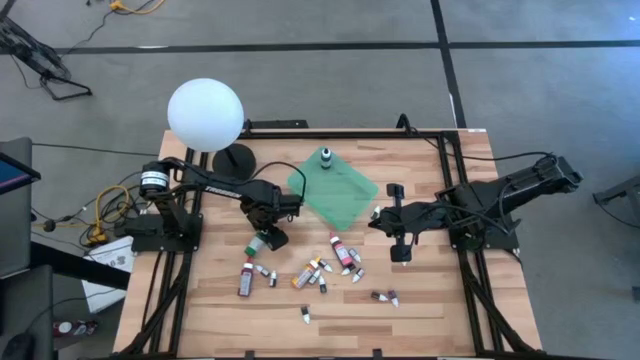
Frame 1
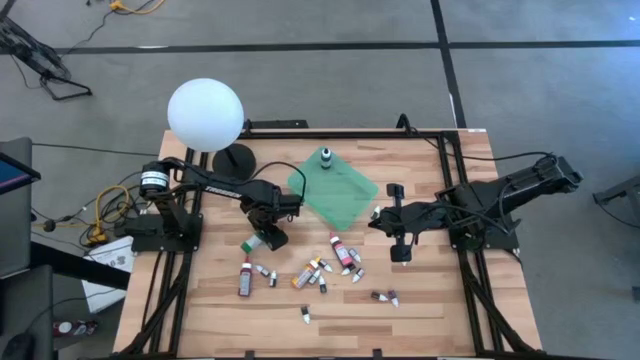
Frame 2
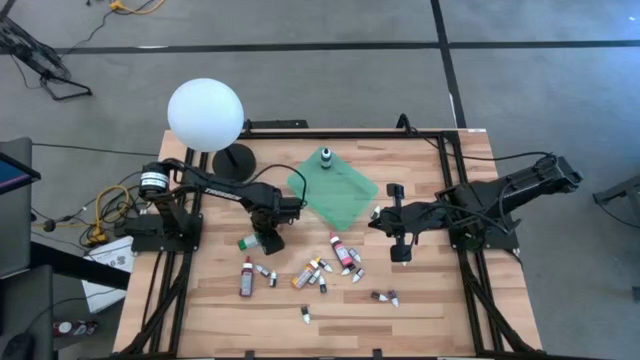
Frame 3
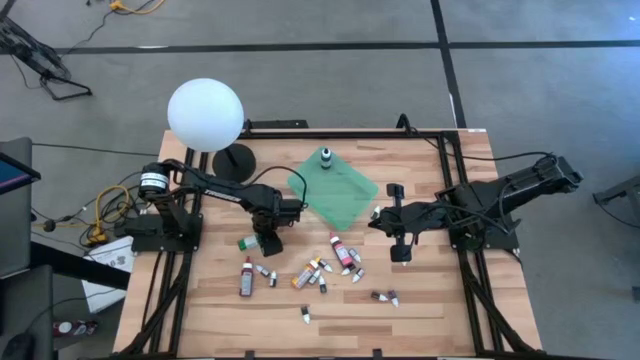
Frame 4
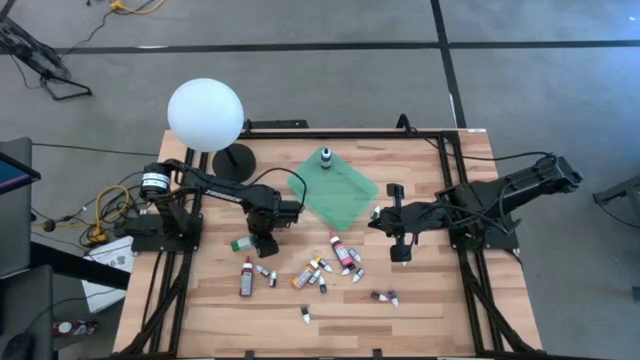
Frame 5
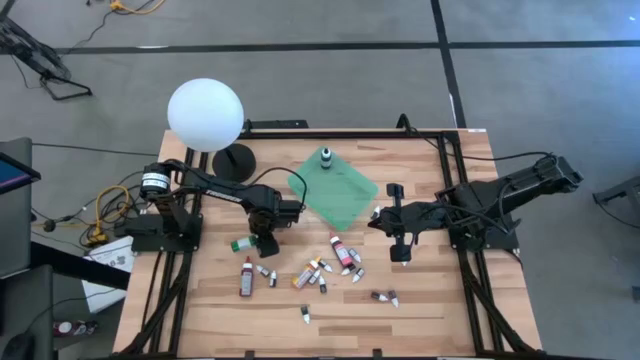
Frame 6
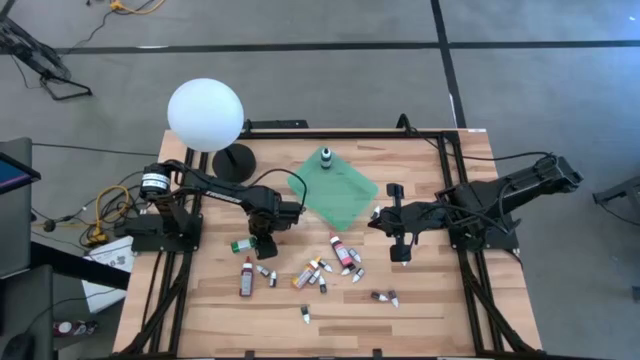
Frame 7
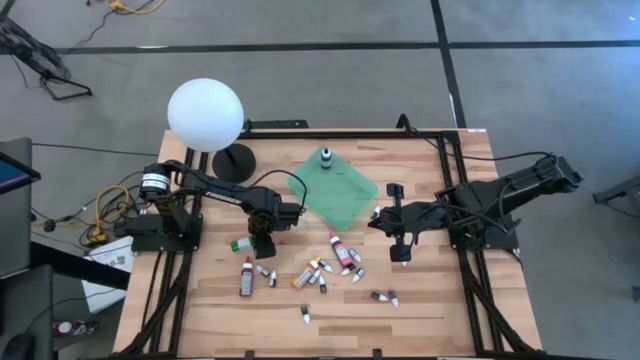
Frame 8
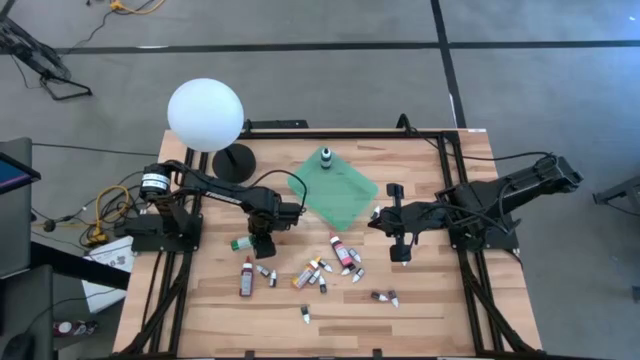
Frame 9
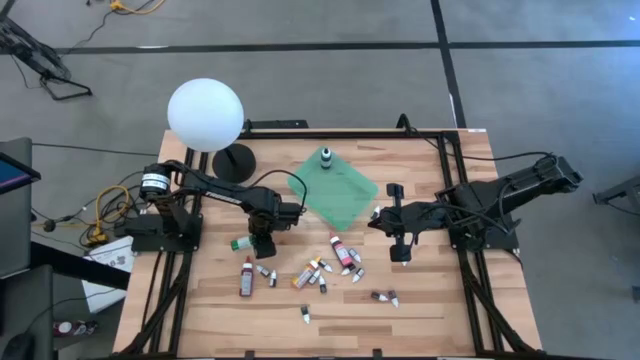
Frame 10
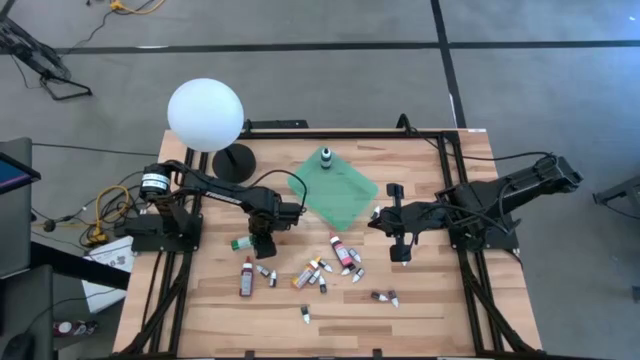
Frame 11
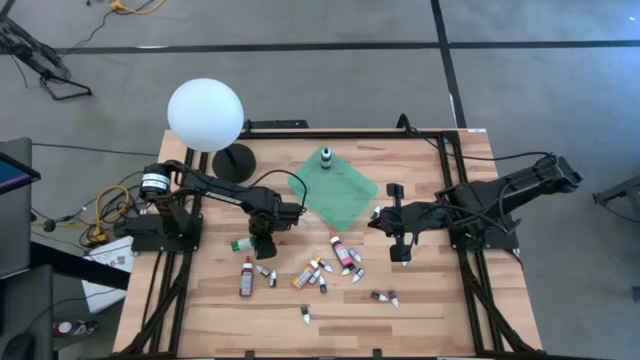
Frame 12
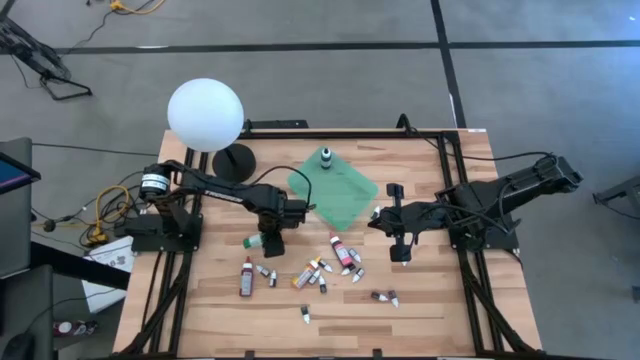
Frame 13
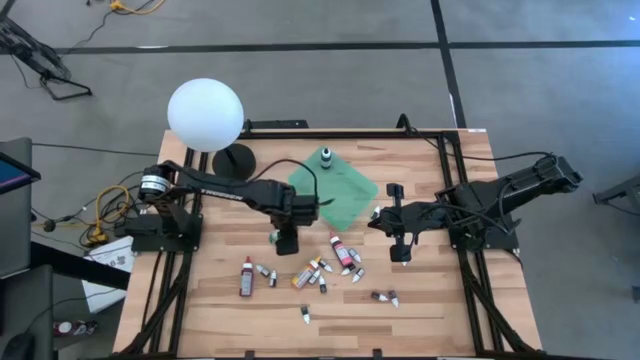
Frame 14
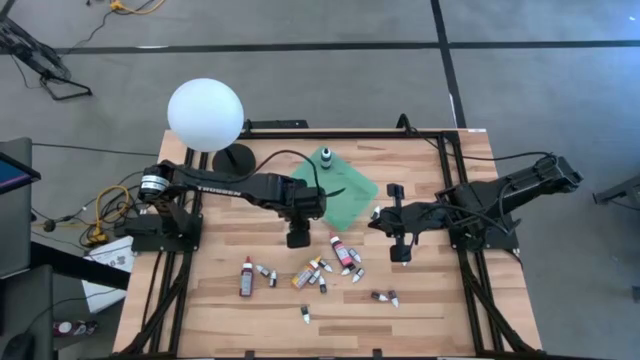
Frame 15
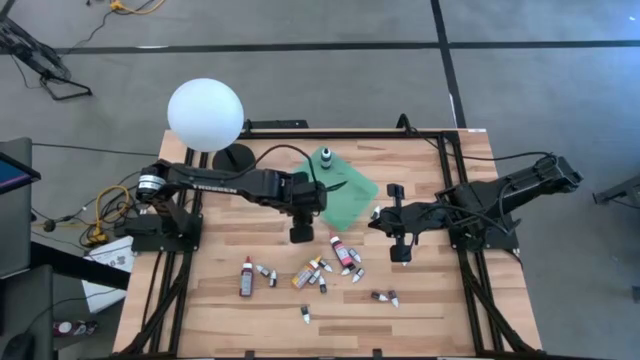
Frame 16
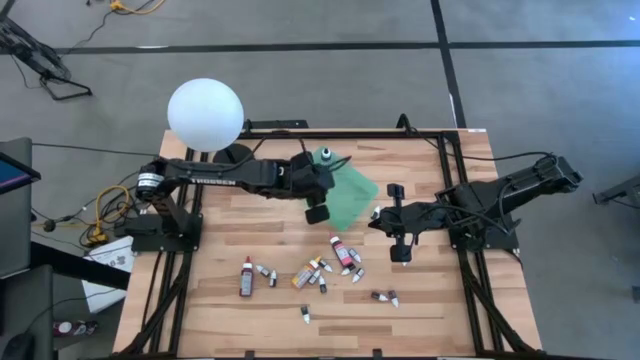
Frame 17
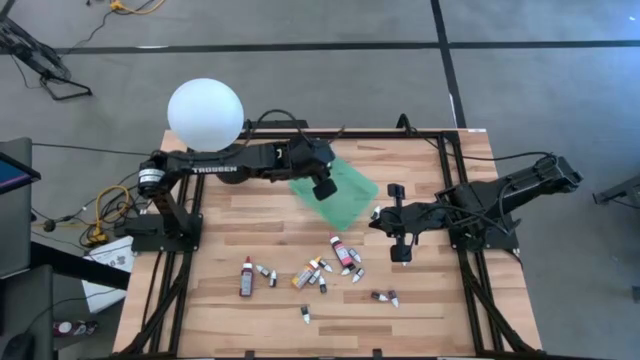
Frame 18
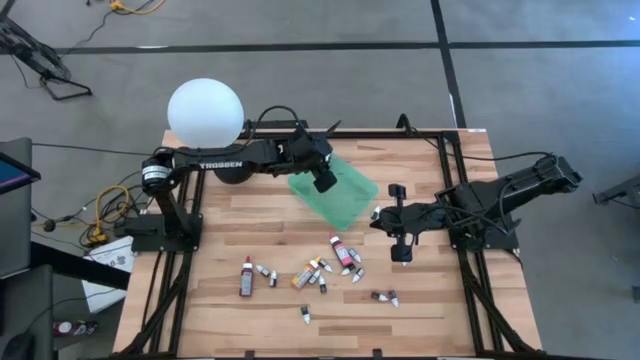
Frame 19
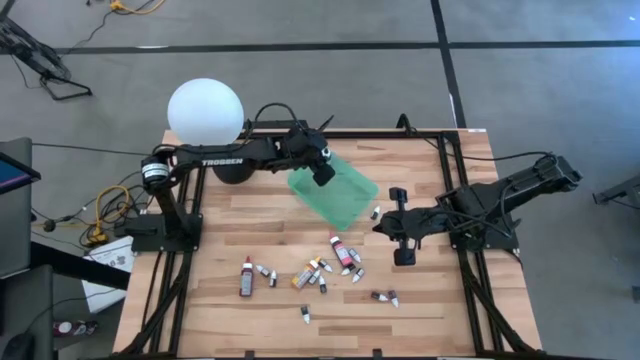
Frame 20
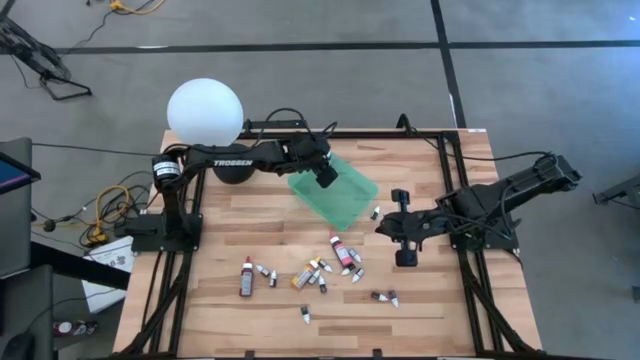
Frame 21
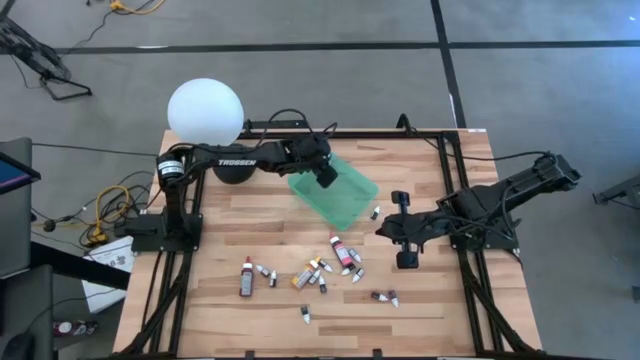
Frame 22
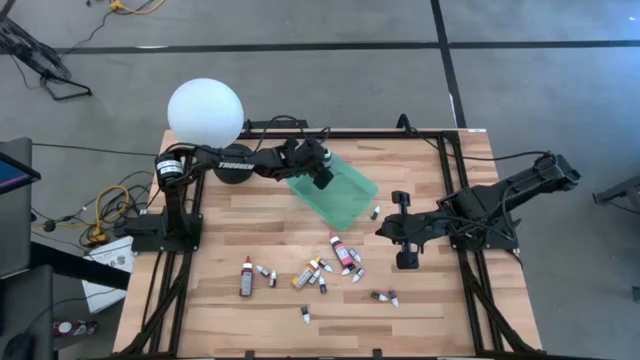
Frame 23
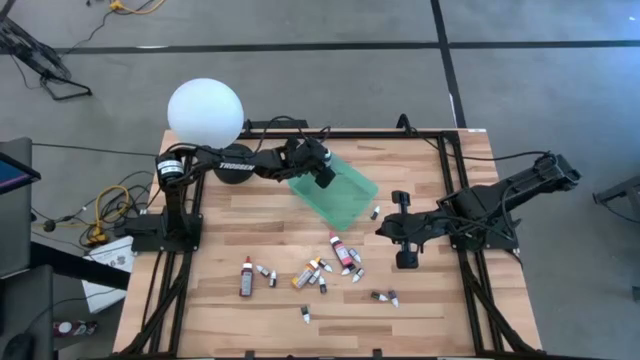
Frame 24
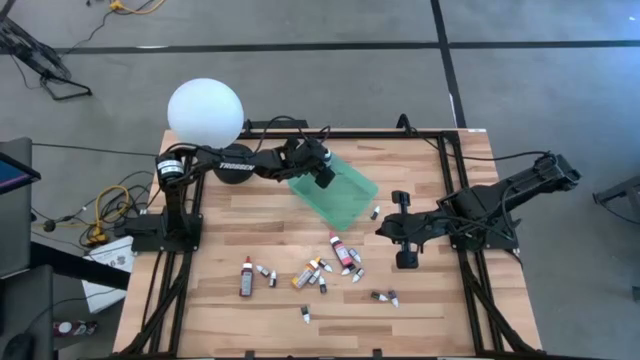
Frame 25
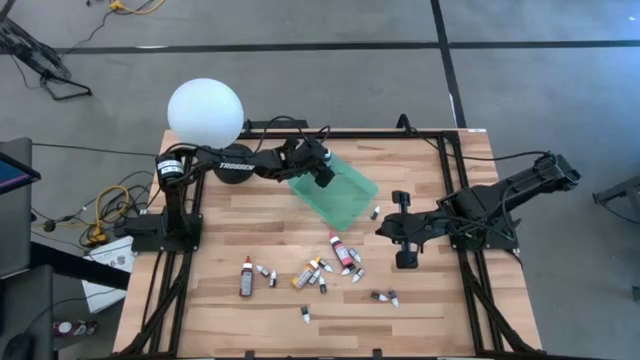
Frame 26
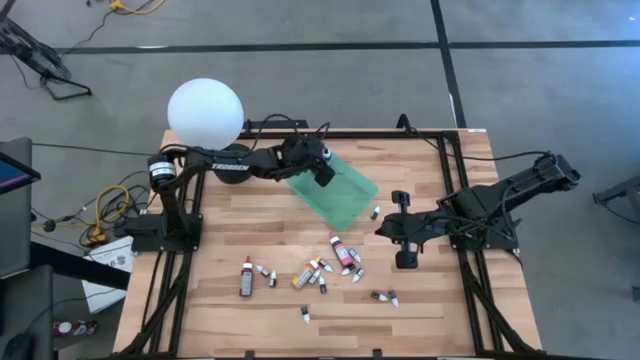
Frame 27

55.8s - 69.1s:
Task: Pick & Place food coloring
Put the large green food coloring bottle into the green bin

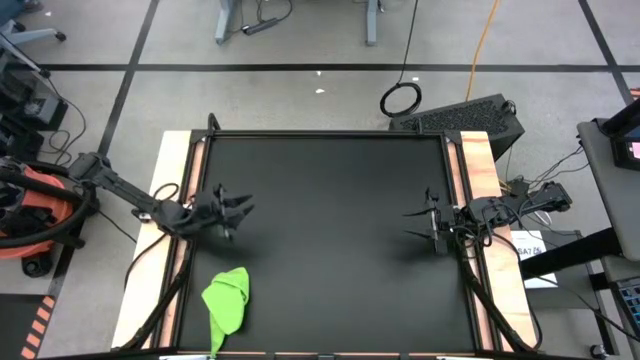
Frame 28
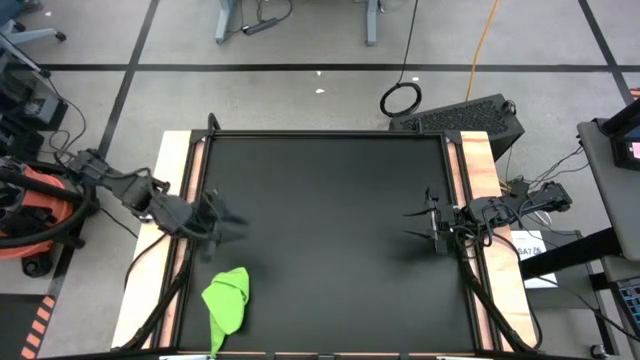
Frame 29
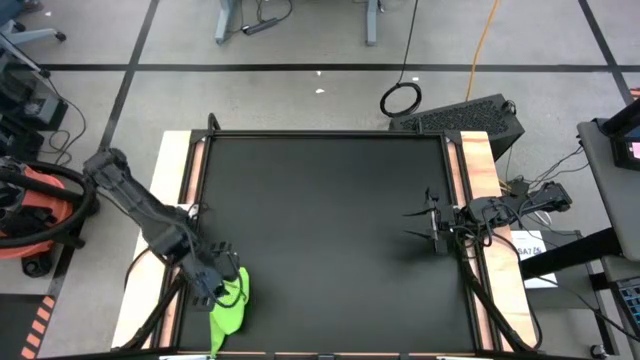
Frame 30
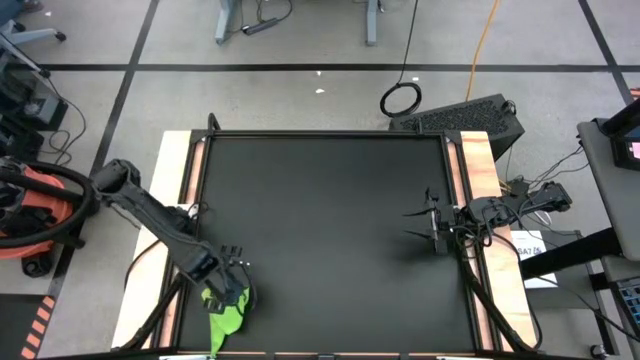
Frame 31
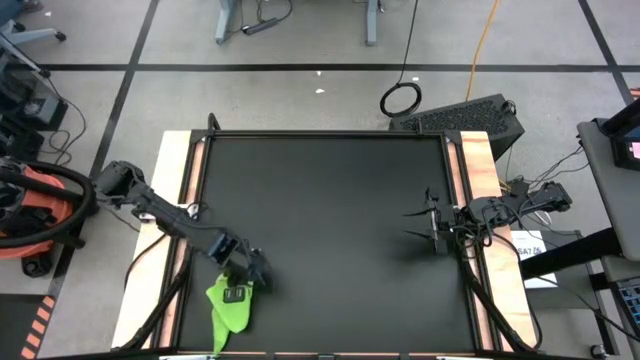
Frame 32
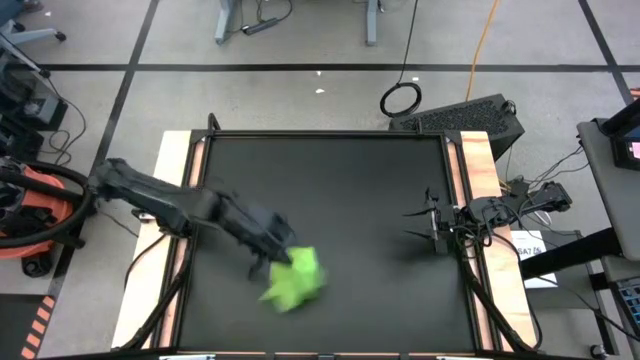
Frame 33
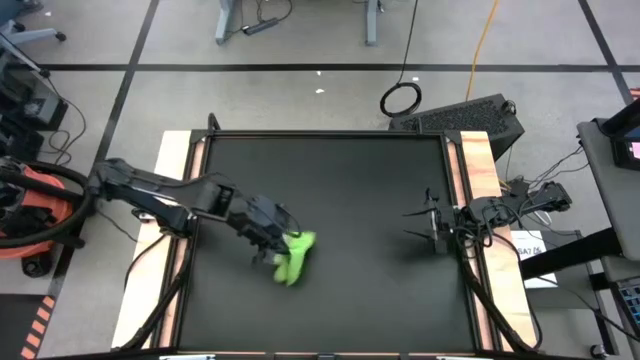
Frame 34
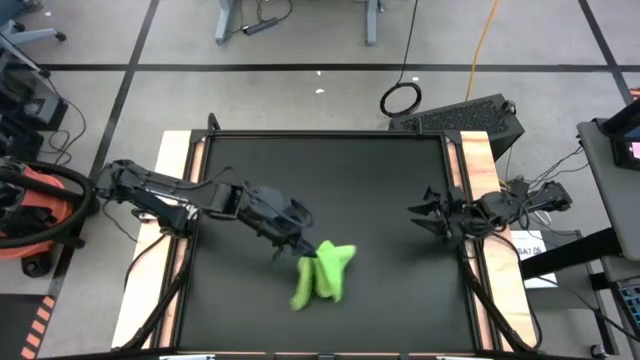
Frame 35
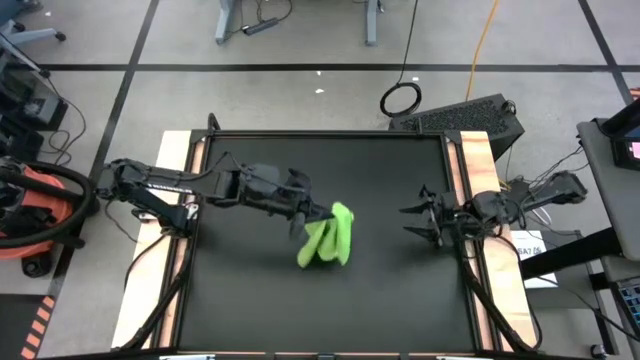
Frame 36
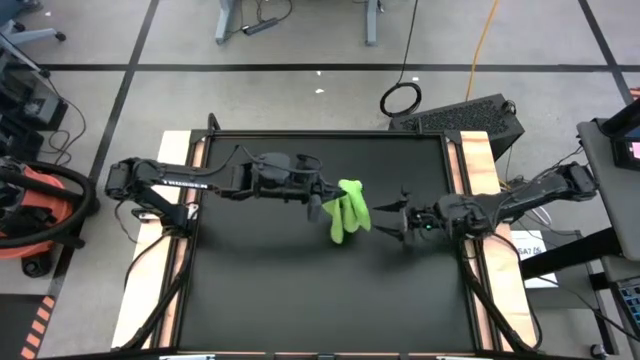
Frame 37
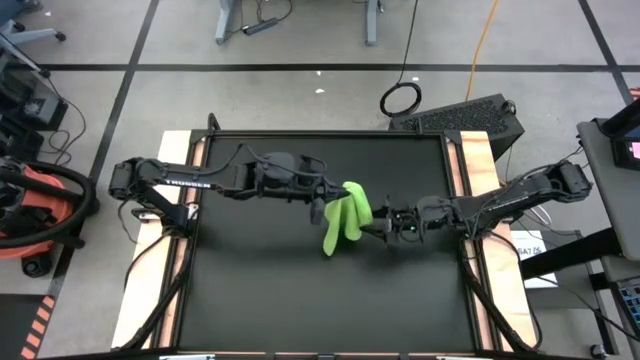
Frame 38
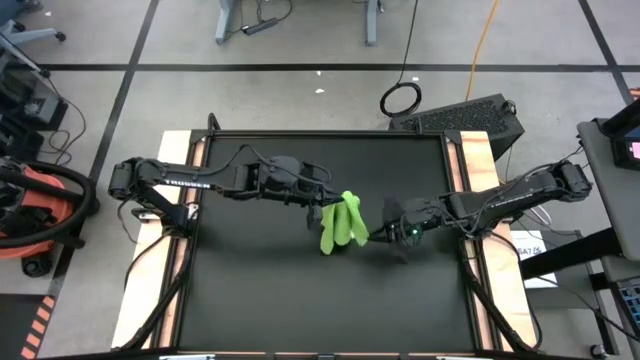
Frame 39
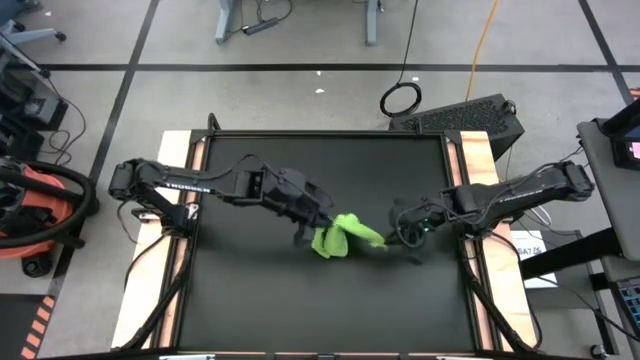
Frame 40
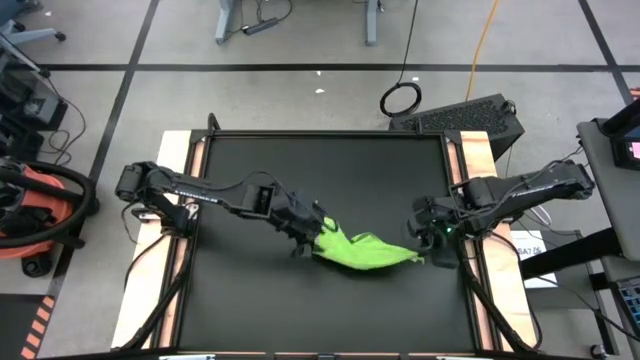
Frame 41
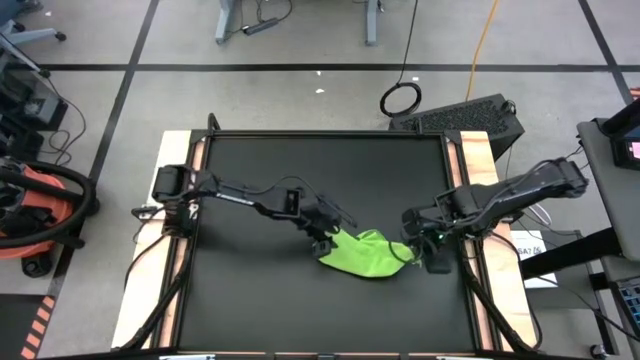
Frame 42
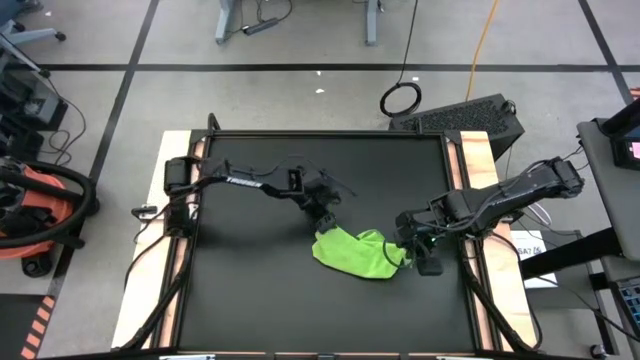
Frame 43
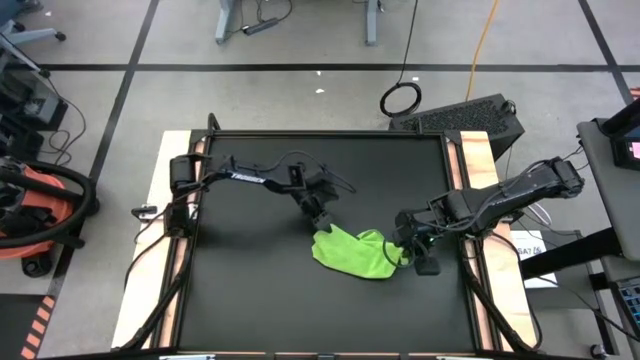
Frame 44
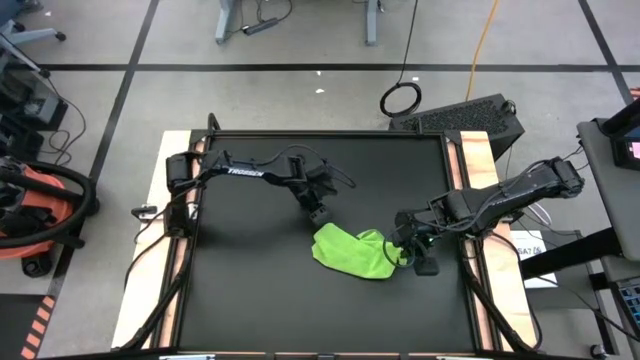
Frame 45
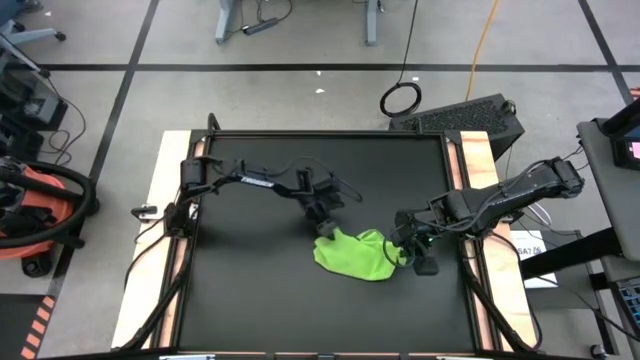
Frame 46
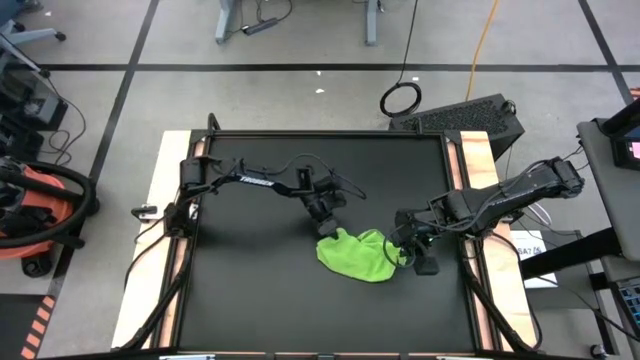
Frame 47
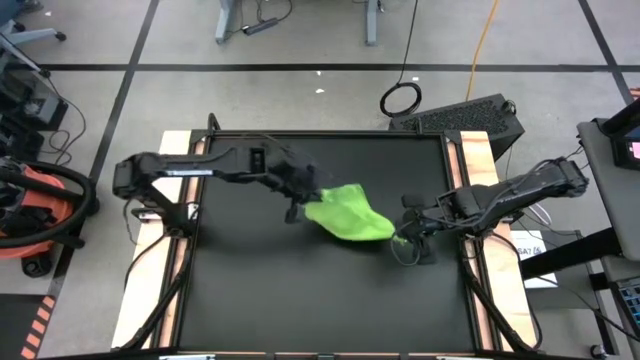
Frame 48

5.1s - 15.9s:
Task: Roll towel
Roll the green microfiber towel
